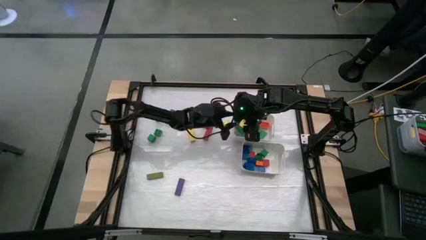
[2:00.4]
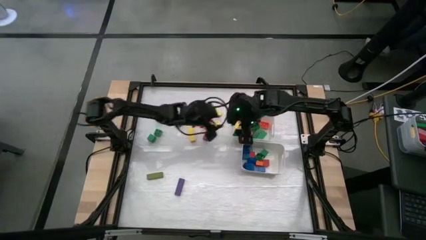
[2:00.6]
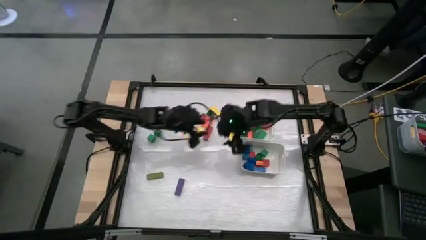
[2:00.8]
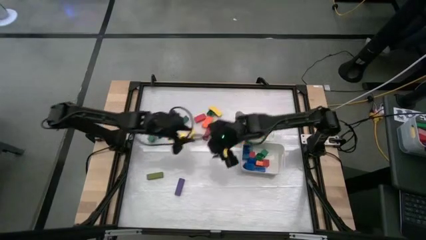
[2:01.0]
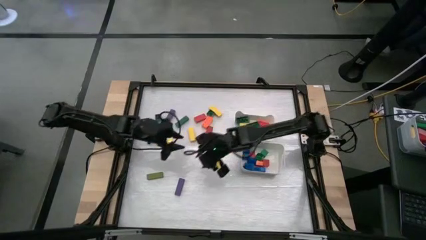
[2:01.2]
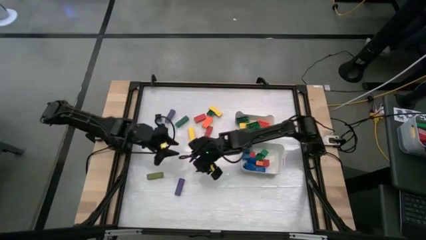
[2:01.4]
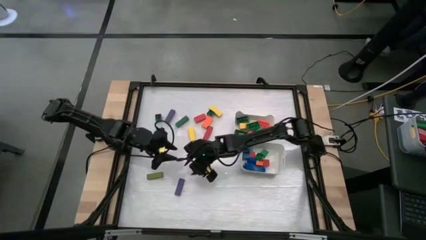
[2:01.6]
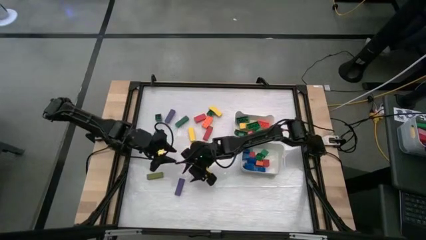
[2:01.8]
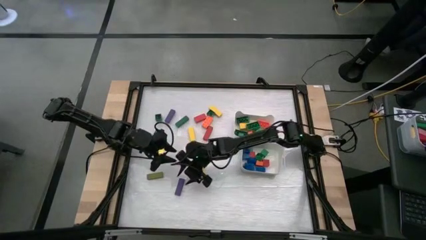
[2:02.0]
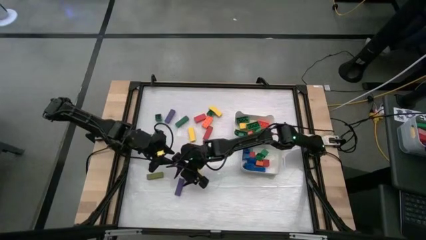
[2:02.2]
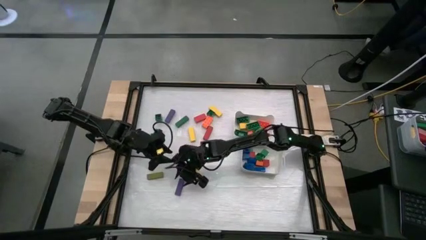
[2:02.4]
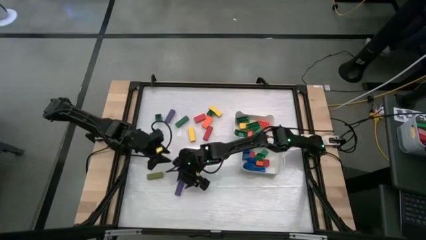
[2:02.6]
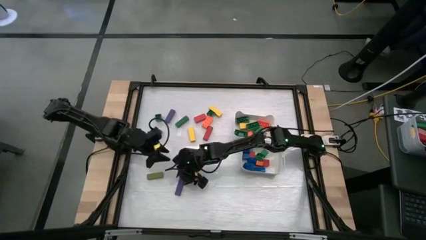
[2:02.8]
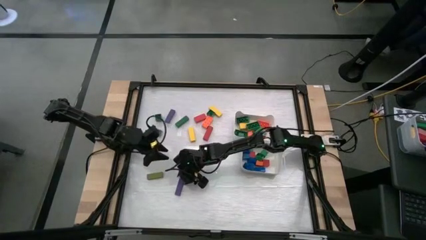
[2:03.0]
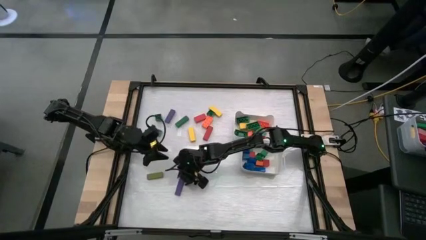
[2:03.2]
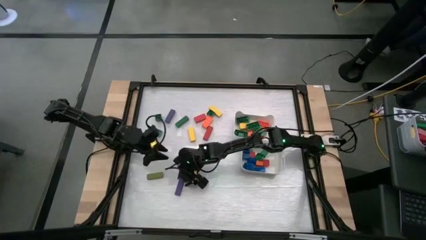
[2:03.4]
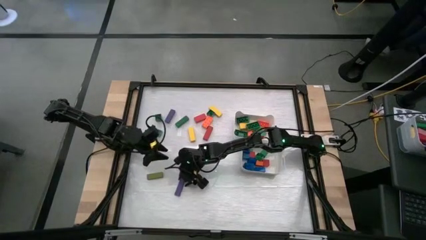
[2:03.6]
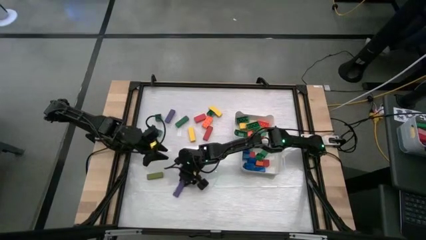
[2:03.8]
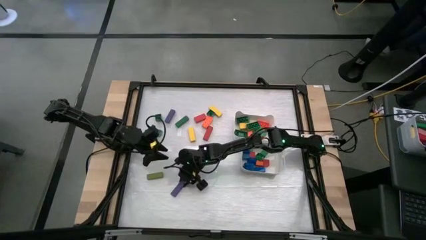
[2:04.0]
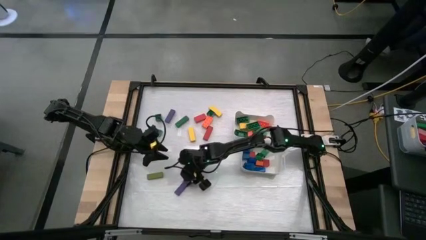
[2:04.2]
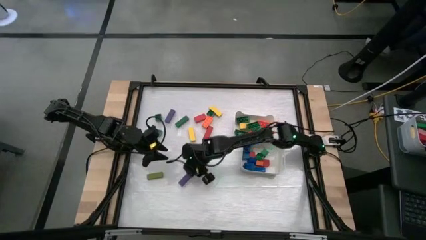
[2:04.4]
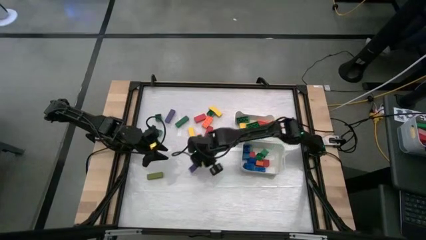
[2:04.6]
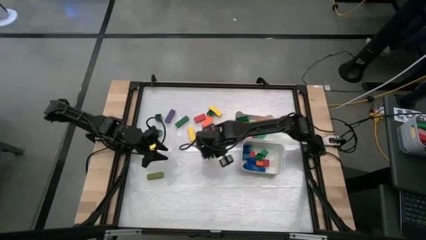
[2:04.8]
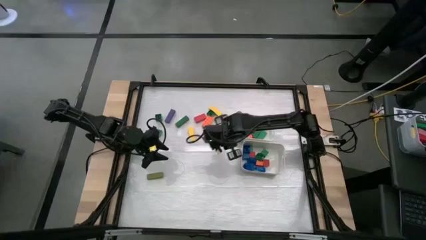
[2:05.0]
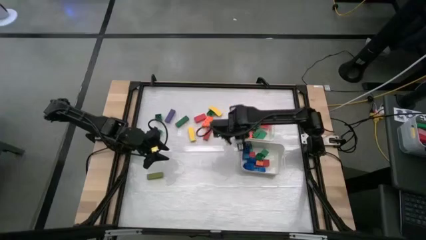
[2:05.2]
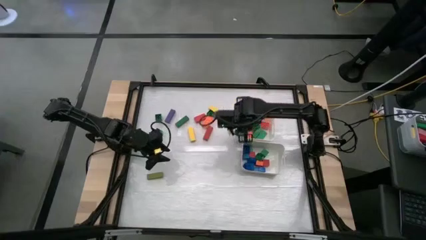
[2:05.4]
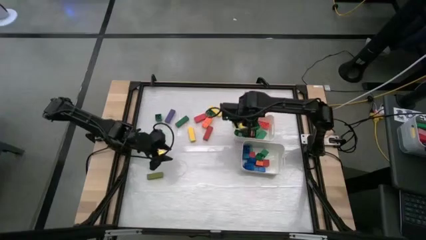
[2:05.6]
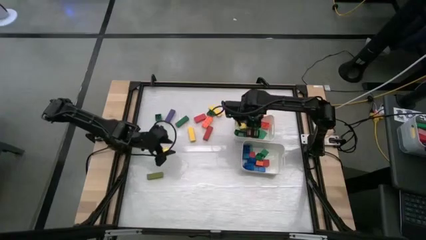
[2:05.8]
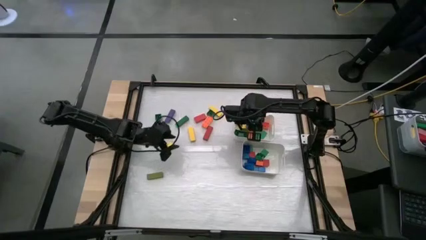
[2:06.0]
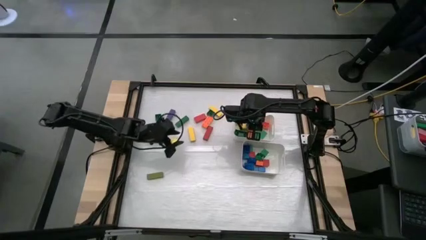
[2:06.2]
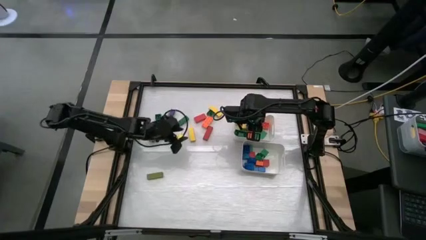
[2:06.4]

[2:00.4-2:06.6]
Task: Sort blocks by size
Put the violet thin rectangle block into the top white bin

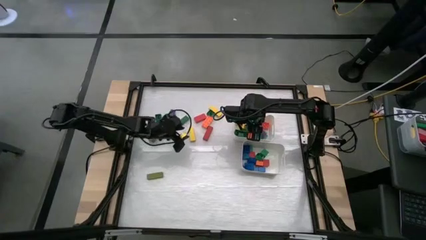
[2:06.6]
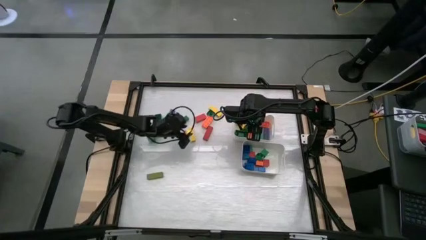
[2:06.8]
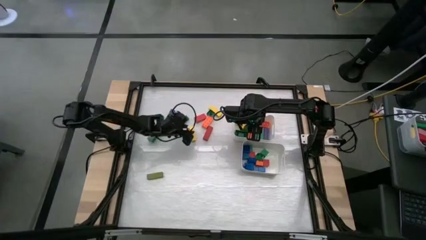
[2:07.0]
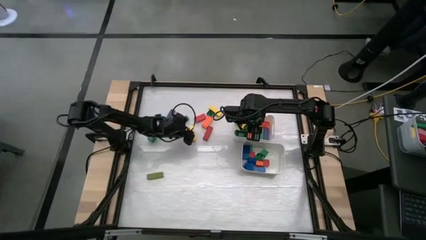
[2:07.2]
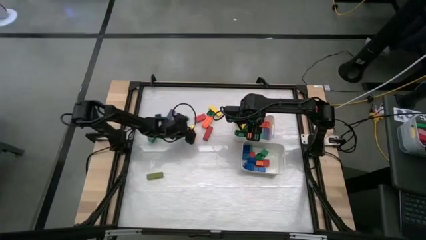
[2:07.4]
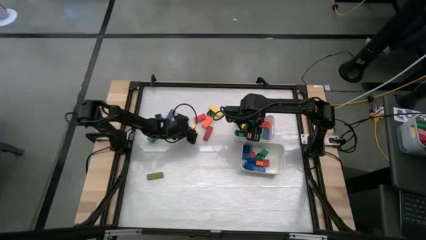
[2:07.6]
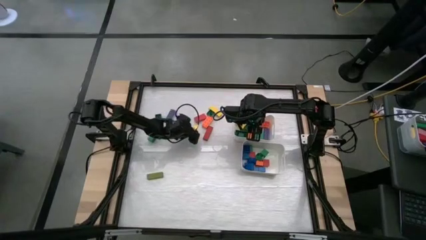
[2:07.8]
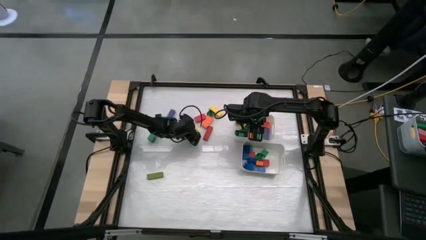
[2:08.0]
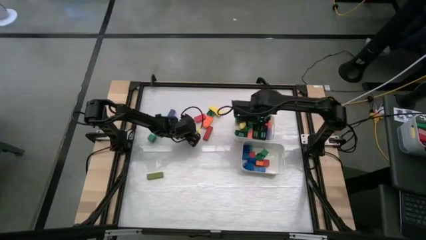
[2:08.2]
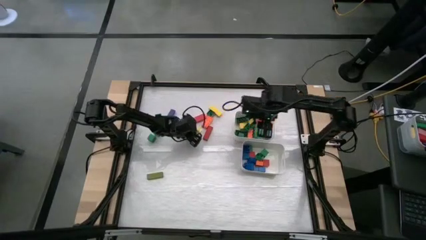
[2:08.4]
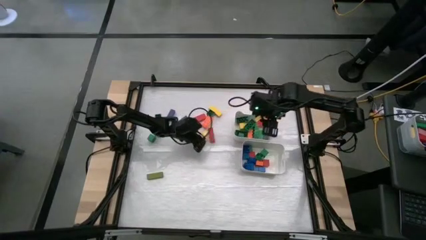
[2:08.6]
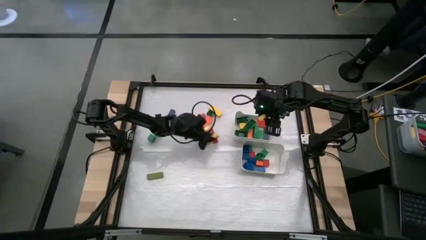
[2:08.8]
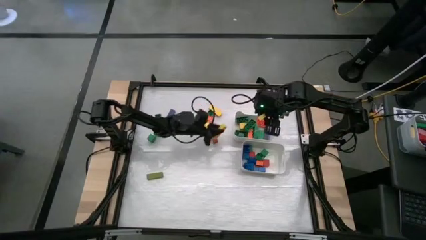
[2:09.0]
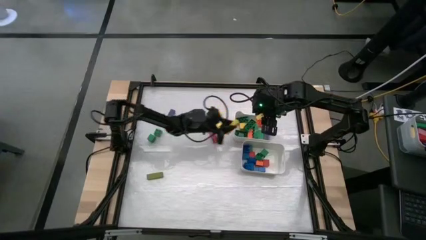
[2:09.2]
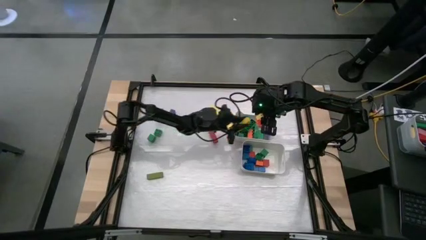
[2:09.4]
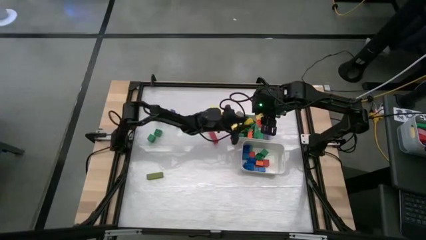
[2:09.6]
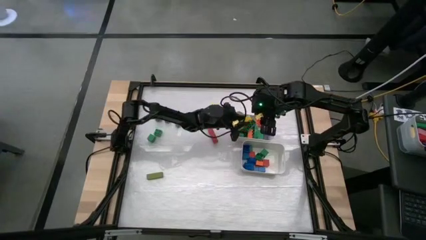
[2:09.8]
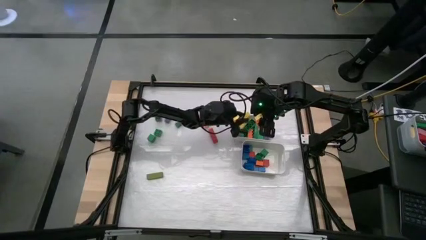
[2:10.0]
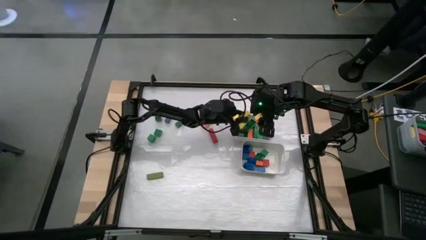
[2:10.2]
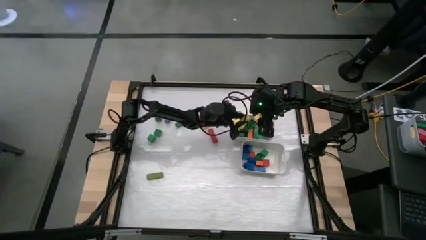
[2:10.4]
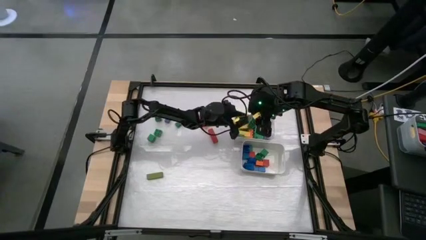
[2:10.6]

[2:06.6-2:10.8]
Put the yellow thin rectangle block into the top white bin

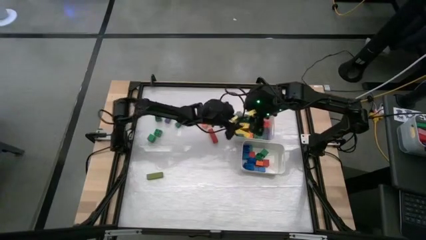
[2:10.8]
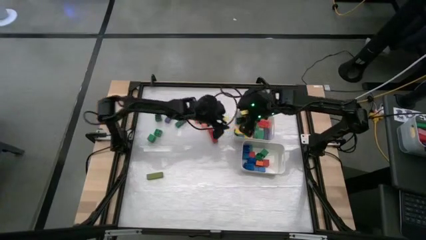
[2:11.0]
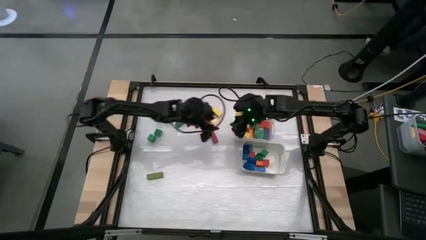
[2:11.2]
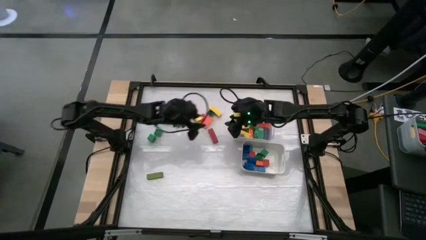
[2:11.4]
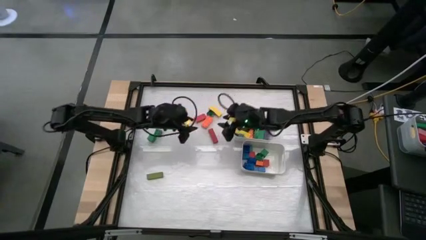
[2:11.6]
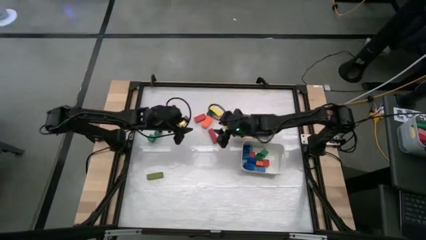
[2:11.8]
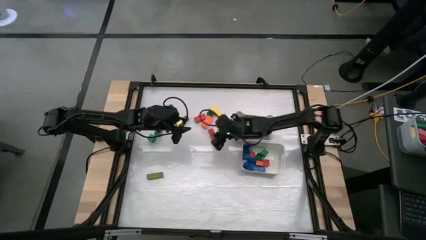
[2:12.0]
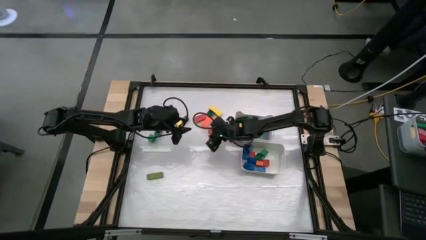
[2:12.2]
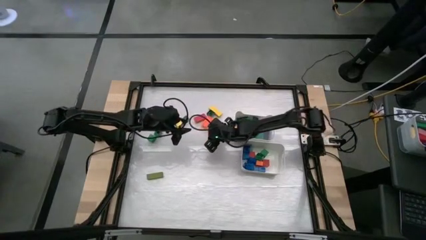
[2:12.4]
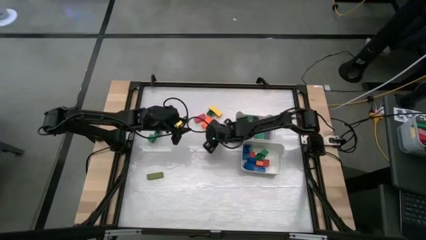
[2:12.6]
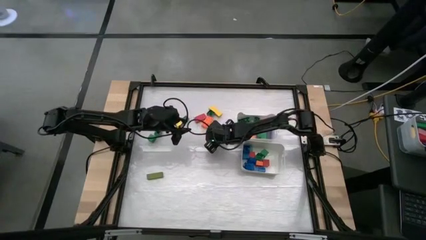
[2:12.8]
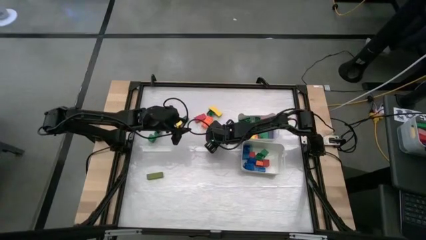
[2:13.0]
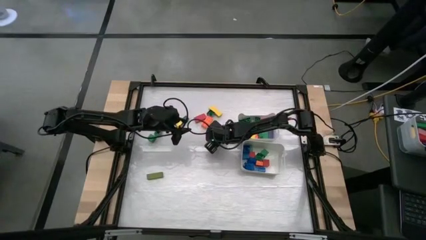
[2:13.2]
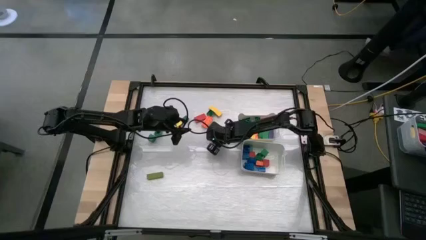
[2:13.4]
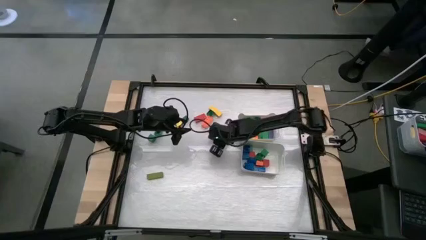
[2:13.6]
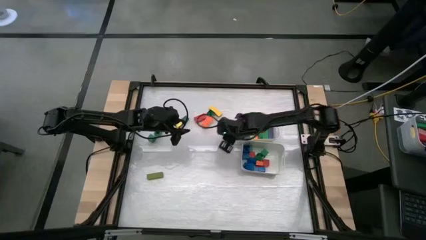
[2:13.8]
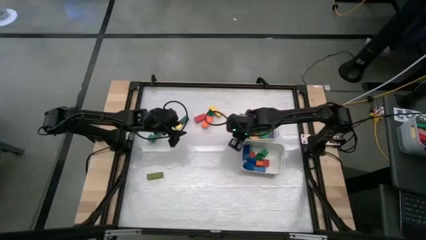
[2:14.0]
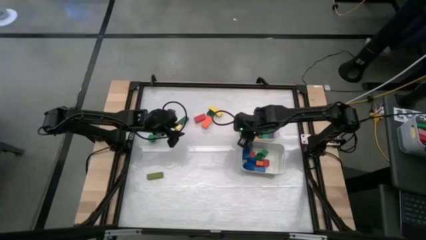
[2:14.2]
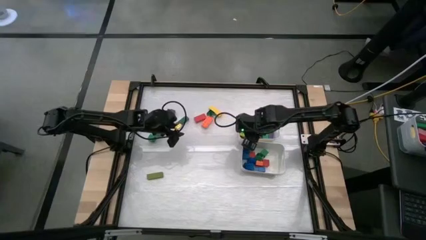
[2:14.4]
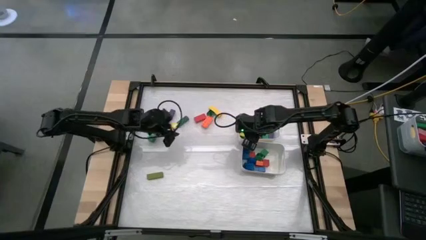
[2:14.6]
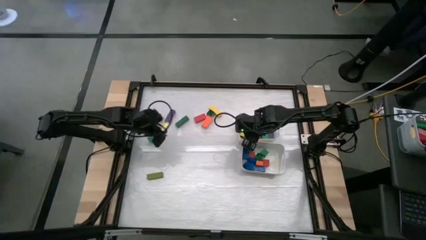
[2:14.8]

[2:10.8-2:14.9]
Put the red thin rectangle block into the top white bin

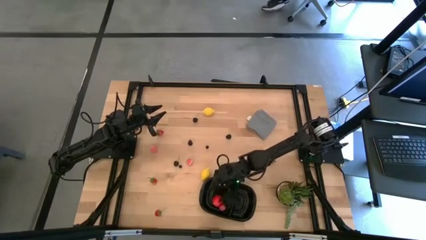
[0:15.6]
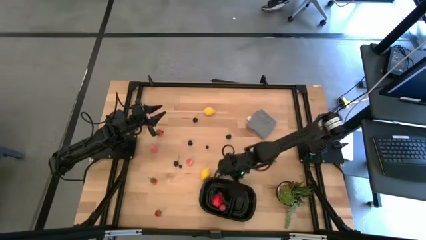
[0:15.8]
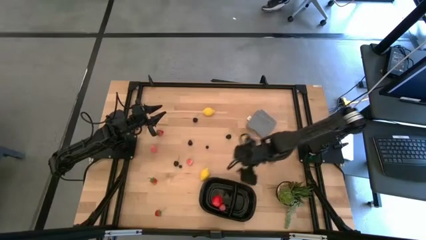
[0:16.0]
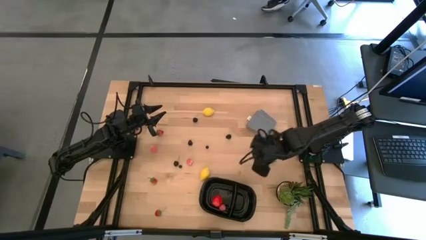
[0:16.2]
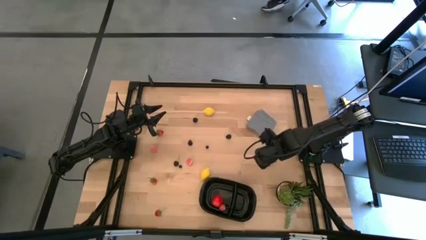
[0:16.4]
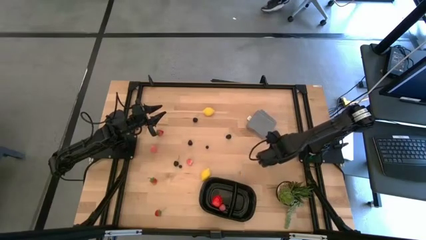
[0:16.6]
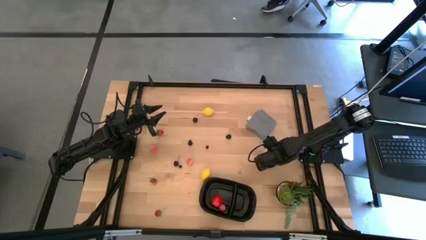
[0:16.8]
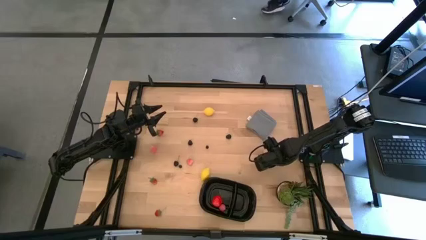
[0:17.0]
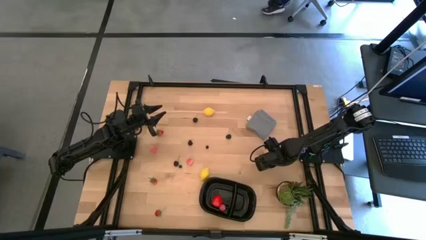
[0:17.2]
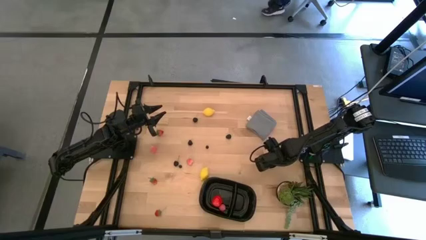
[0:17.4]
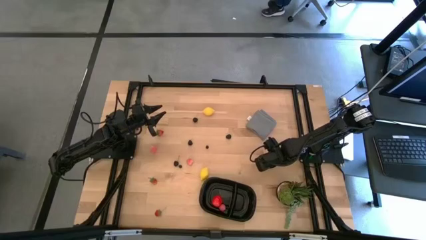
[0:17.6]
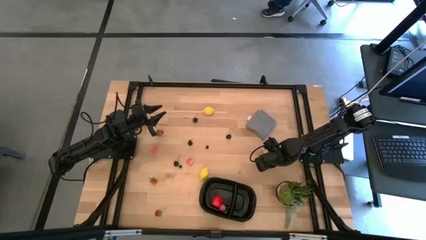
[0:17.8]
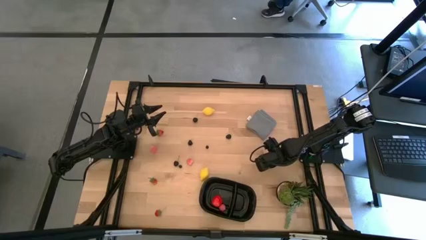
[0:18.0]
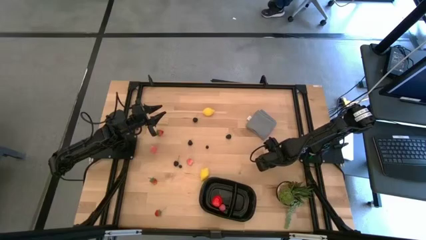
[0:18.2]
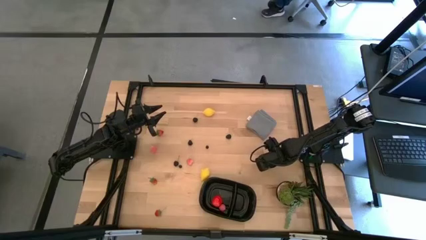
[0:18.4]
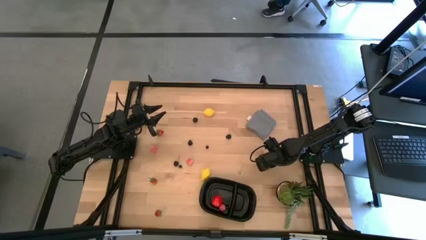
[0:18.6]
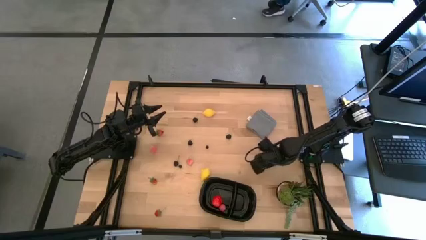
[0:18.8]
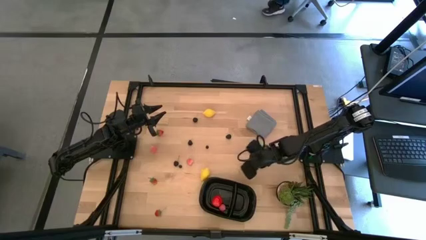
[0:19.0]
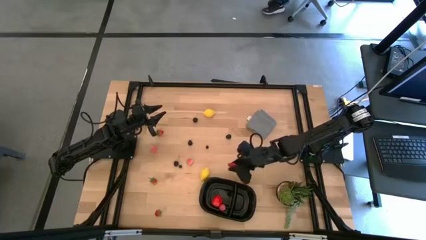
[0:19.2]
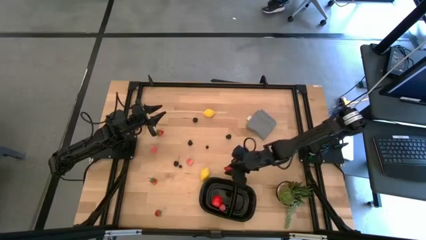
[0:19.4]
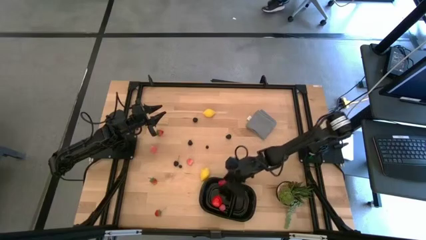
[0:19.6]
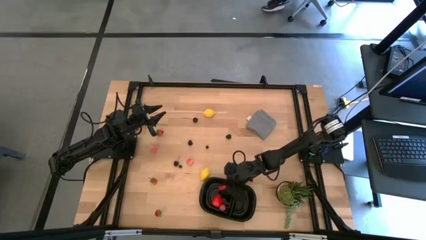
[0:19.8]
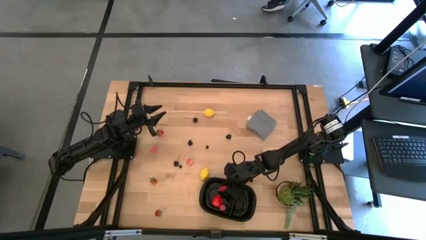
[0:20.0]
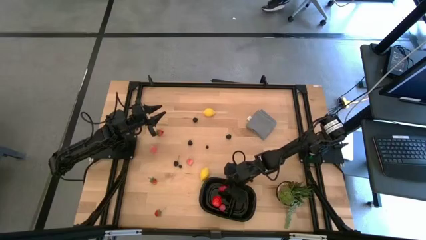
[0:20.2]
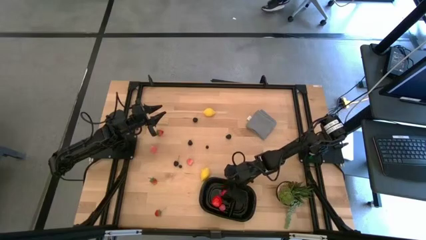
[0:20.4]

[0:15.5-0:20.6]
Task: Pick and placing Produce into tupperware
Put the strawberry into the black bin
